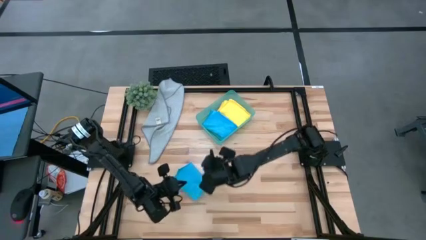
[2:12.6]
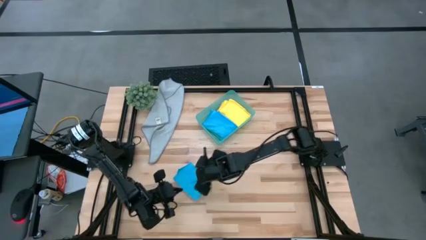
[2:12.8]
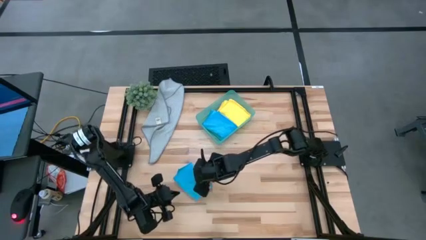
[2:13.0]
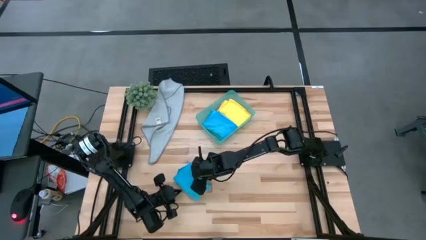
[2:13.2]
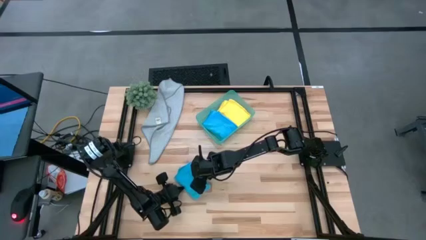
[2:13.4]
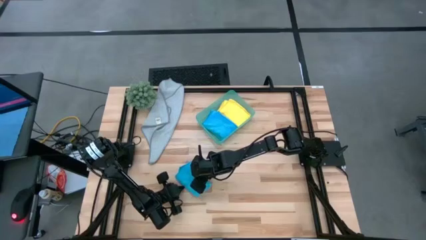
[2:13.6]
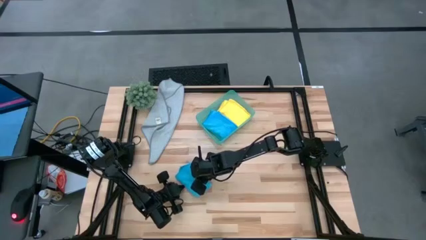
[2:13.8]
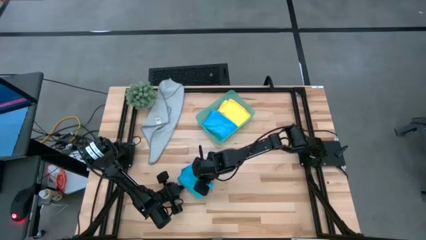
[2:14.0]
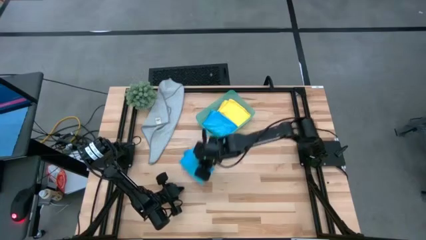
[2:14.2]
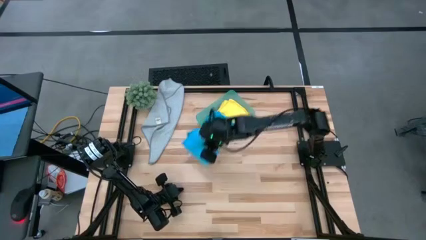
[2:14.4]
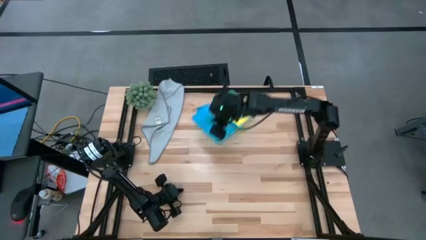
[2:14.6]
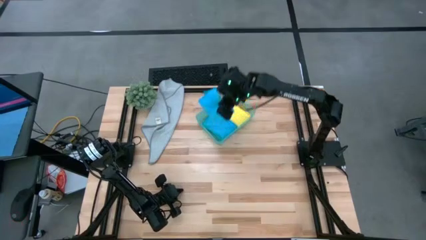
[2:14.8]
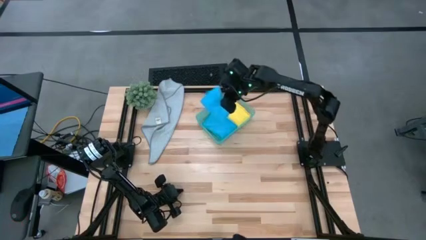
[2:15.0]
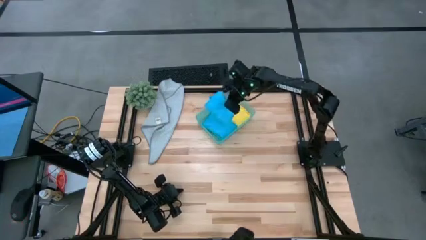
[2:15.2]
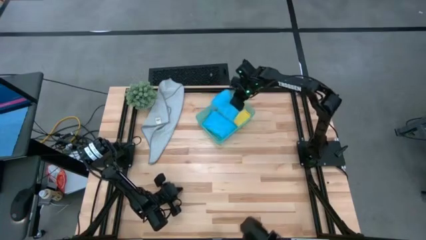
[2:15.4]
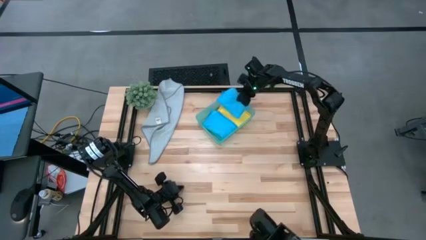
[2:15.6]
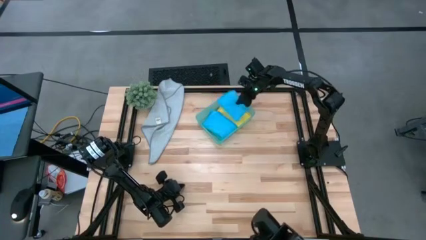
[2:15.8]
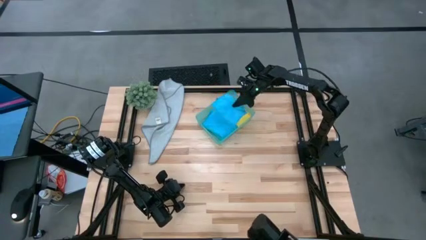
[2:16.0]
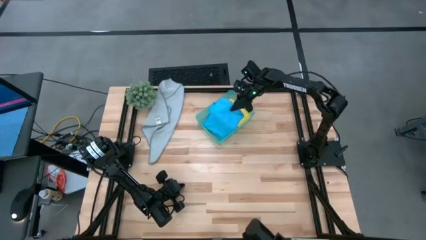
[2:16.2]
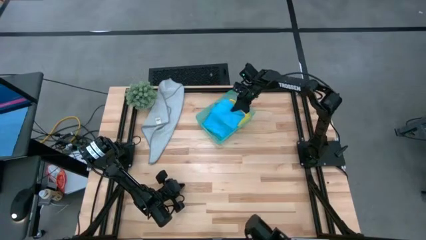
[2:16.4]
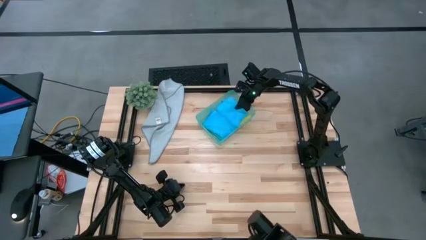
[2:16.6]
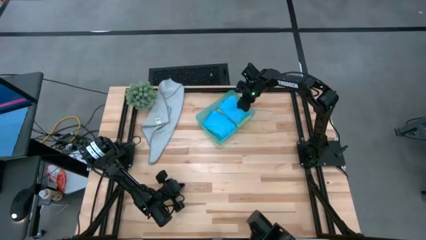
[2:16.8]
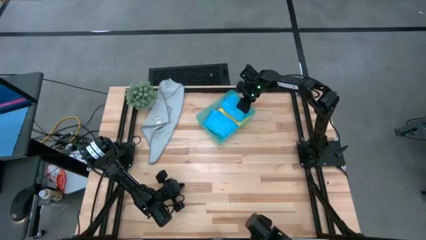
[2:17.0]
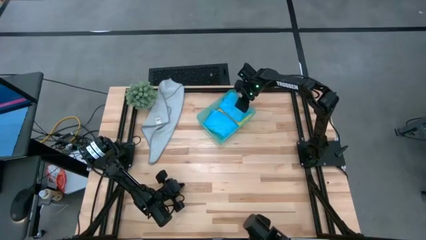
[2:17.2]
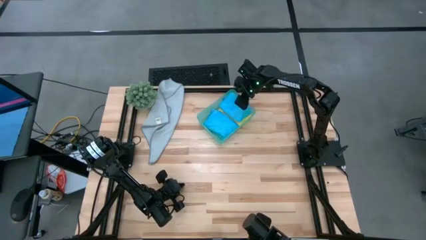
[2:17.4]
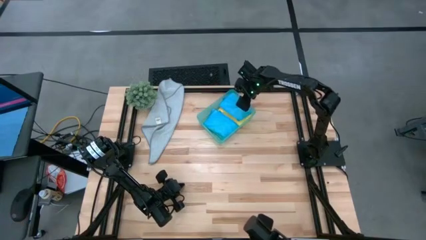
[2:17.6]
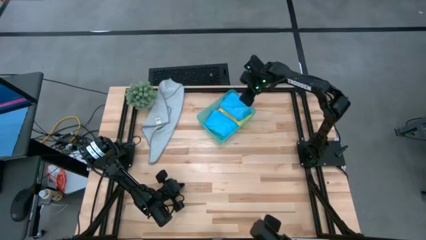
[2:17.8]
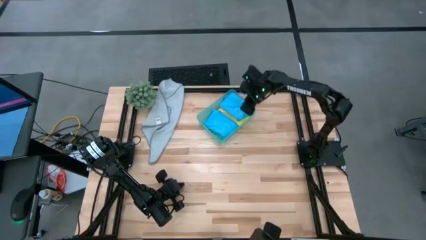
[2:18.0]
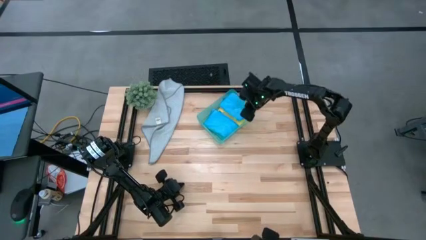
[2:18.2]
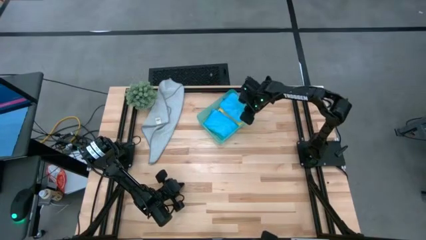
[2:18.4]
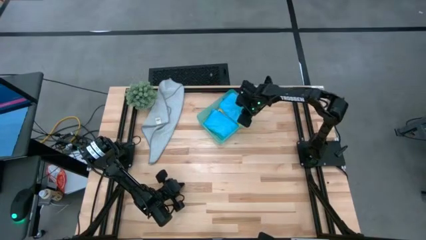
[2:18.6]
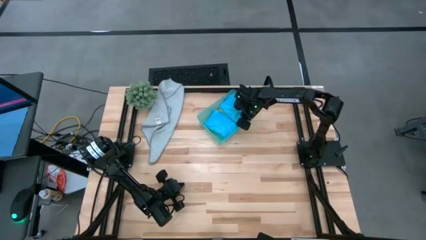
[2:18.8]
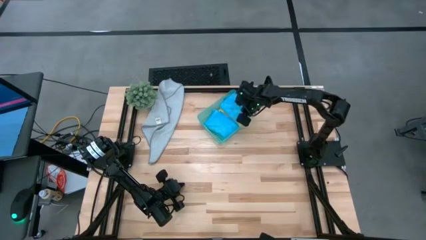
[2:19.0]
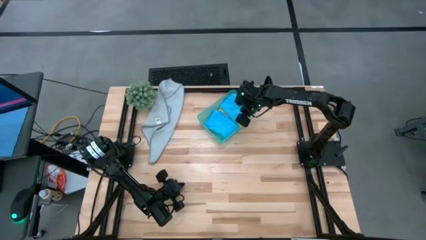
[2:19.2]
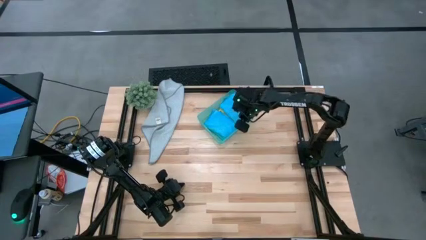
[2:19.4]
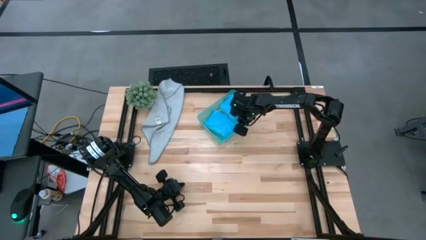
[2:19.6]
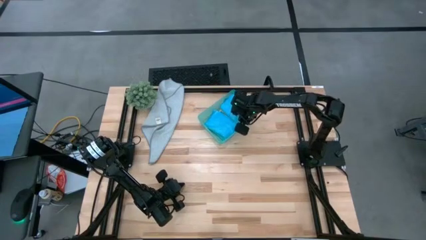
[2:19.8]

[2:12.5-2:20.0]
Task: Fold microfiber towels
Put the folded blue microfiber towel into the green bin

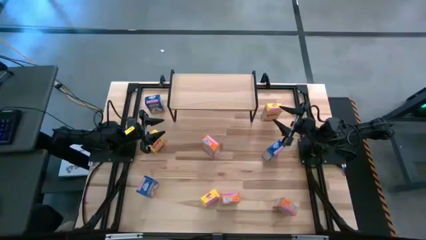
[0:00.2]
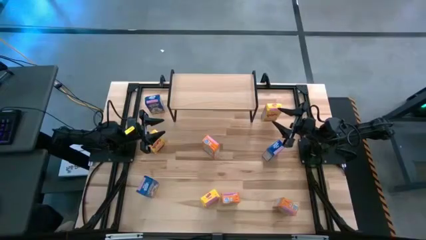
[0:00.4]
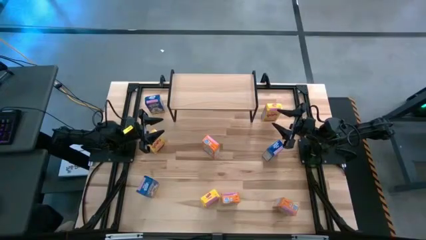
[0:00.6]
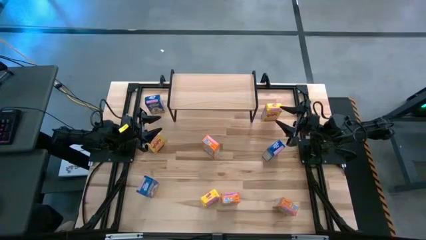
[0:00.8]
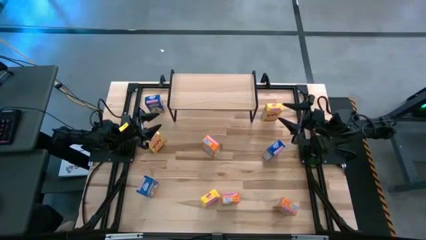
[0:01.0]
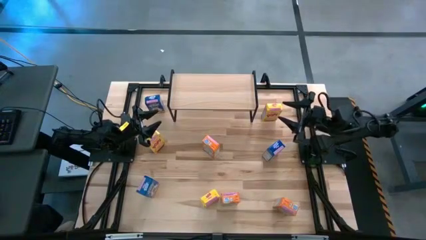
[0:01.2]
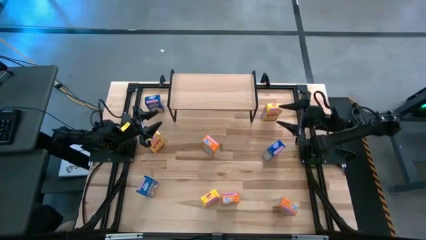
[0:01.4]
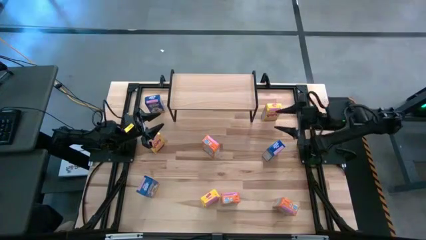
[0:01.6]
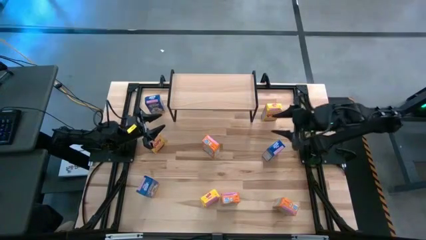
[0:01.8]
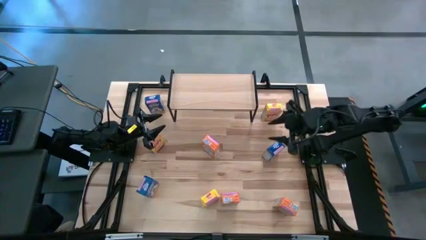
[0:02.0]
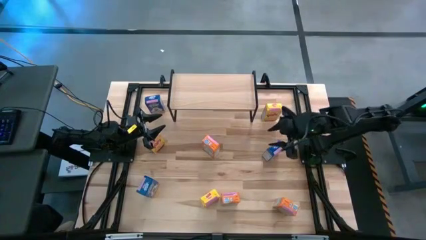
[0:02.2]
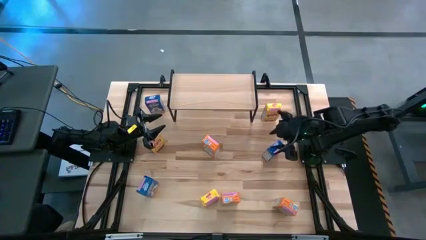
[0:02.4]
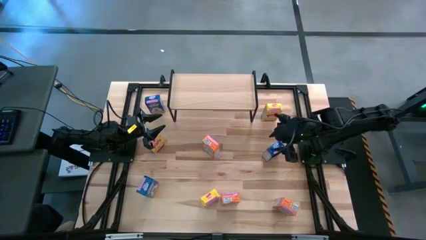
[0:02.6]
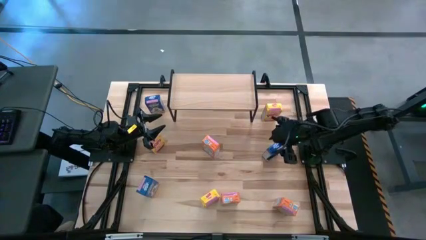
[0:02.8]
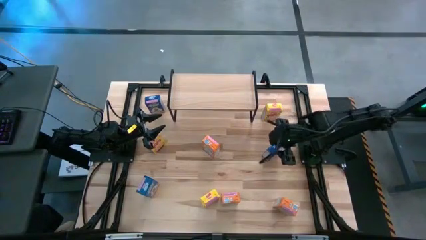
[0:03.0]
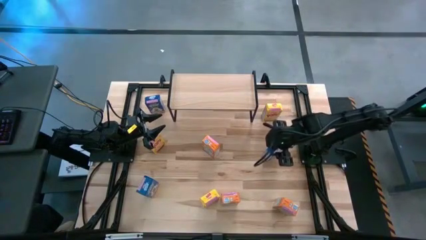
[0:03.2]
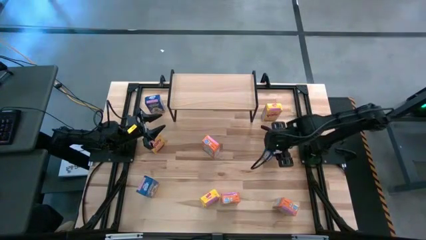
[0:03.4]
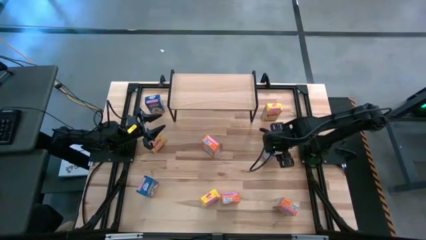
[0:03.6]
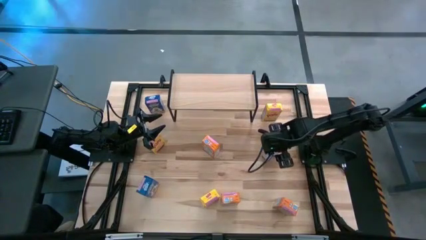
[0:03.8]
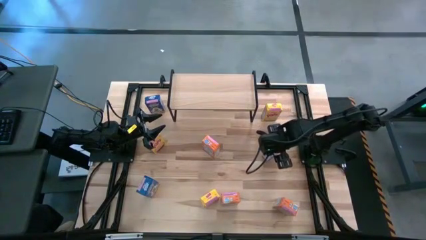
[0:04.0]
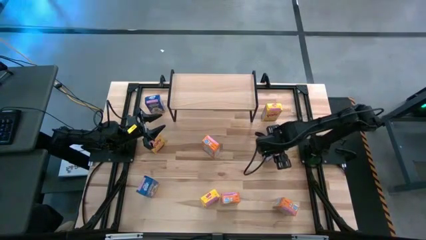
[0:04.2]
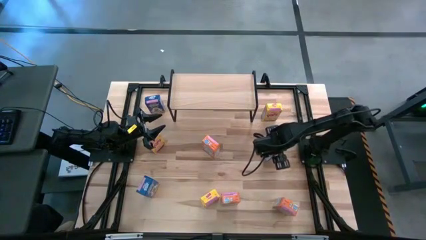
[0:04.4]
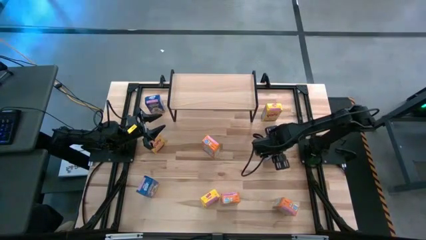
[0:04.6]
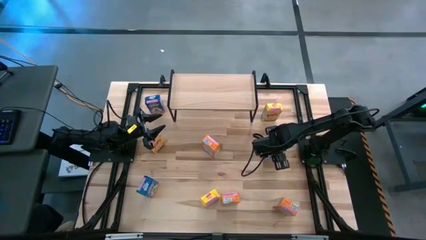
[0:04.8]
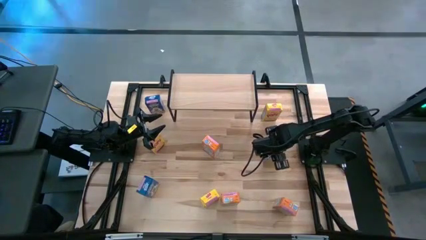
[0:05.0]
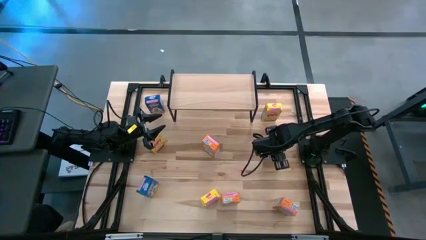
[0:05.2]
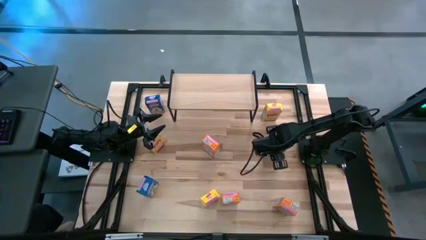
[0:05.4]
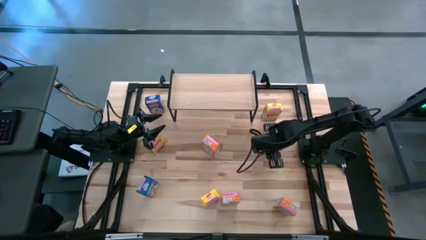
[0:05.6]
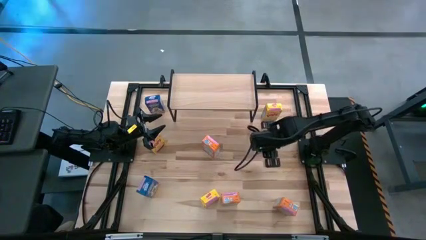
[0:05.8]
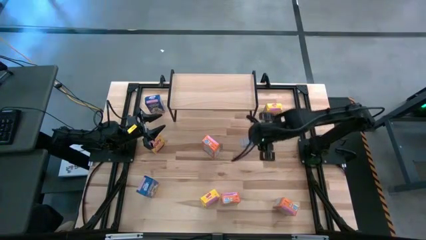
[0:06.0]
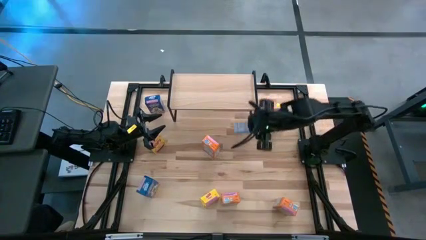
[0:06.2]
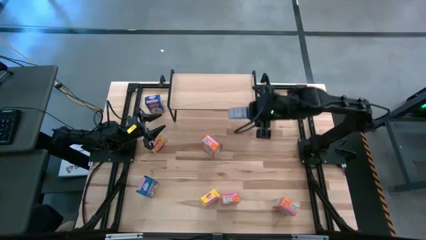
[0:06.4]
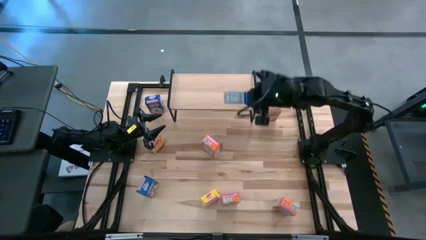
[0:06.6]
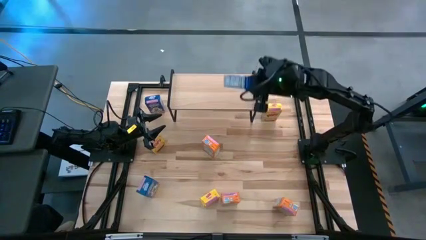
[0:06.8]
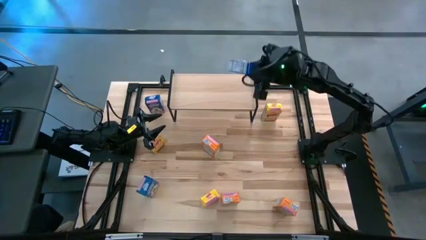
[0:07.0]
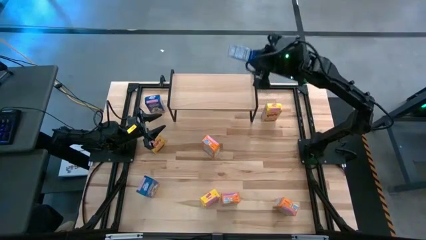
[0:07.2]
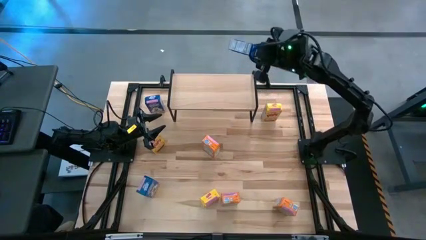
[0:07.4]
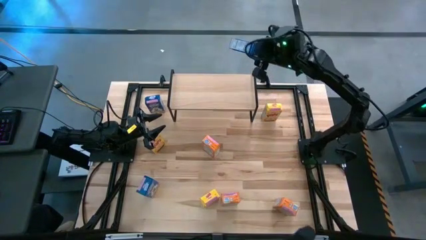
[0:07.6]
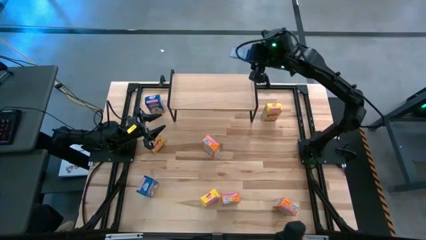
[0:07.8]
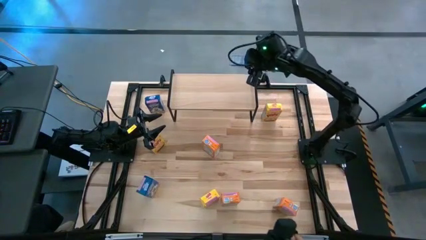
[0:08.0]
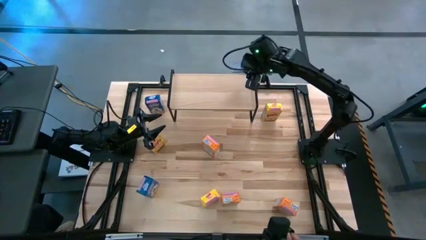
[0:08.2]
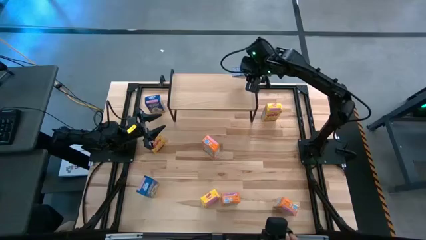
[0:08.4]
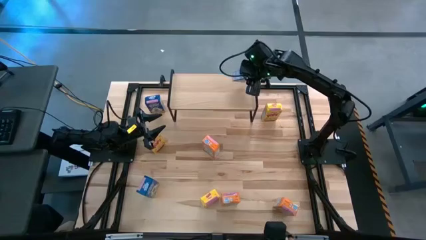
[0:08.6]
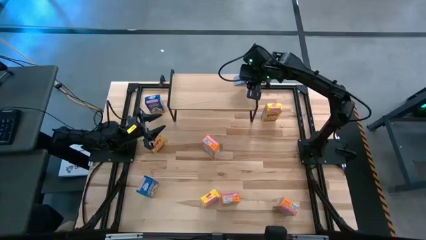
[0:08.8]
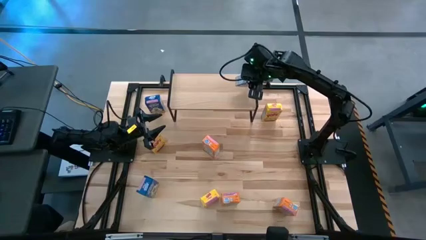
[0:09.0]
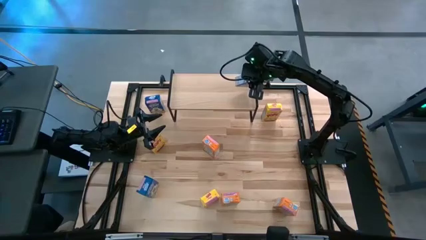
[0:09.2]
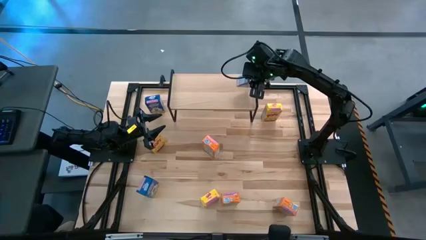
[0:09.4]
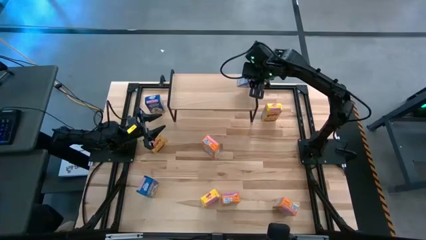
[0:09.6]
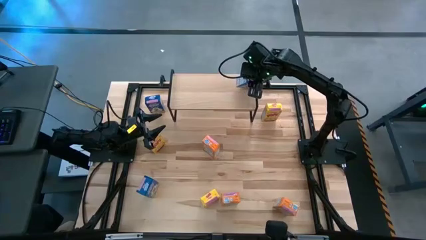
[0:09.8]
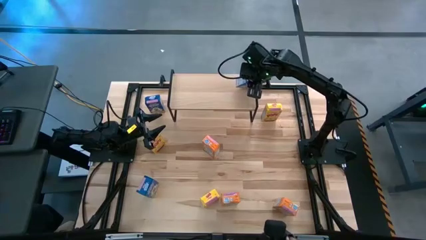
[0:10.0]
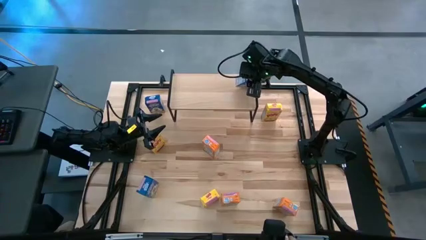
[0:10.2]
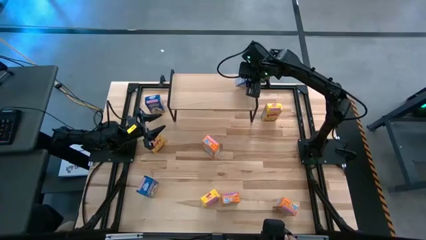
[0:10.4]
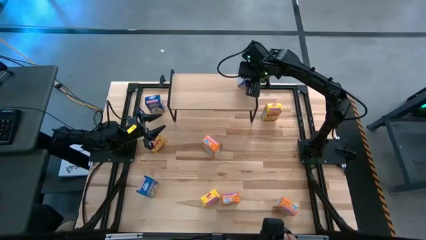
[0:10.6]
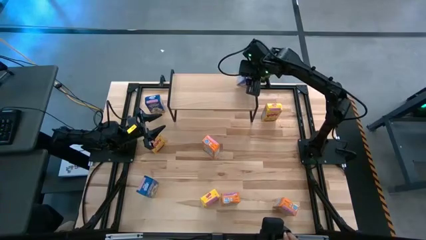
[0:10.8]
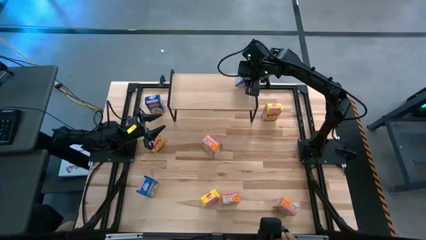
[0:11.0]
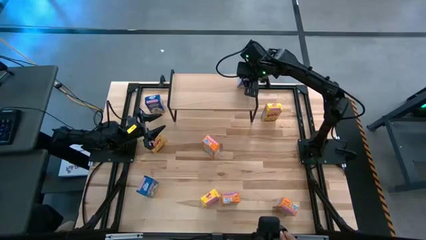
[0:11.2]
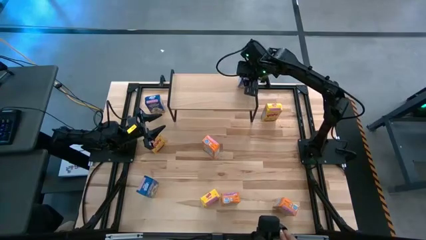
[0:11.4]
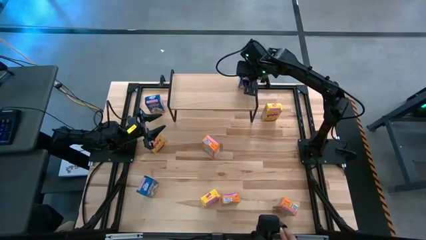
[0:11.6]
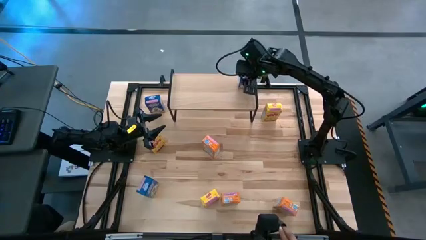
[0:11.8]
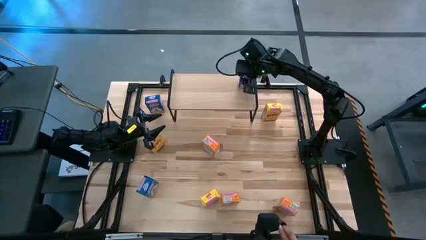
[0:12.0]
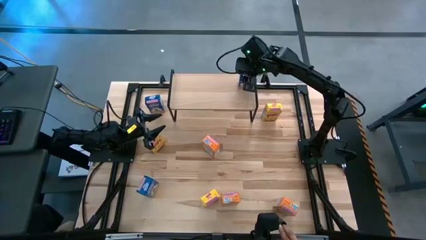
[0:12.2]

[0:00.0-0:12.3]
Task: Stack cereal on shelf
Put the middle right blue cereal box on the shelf
